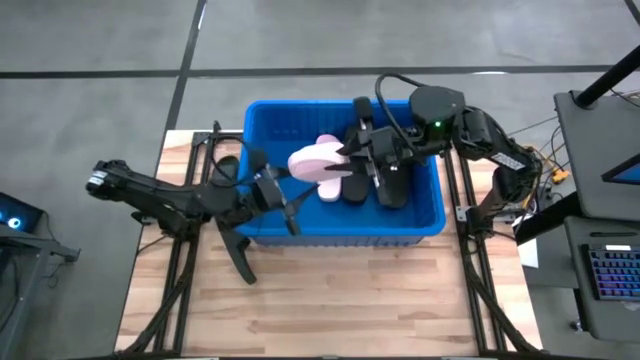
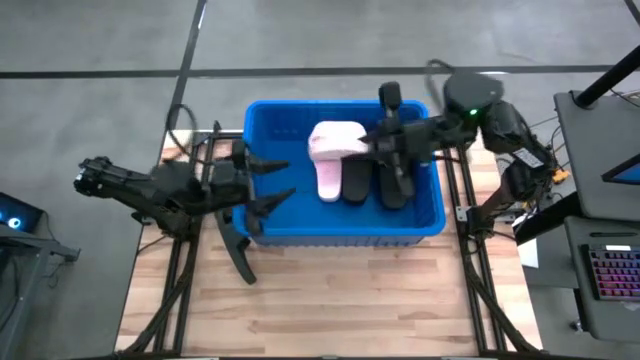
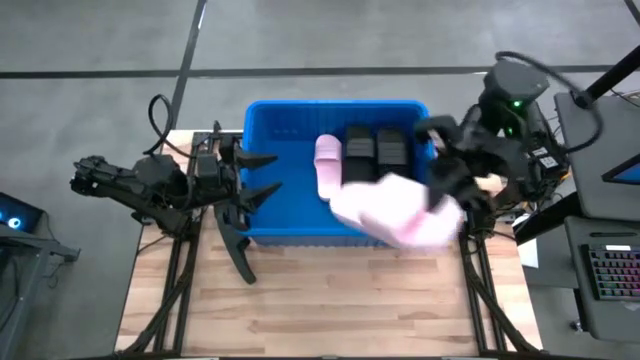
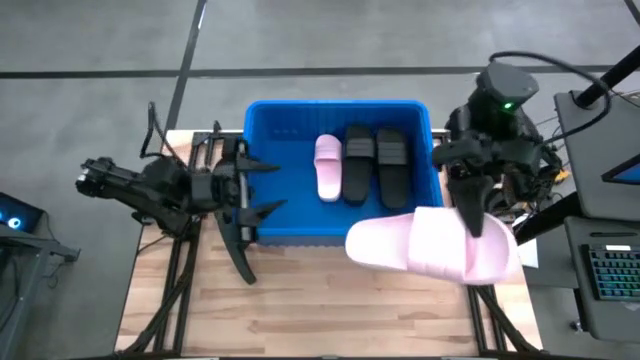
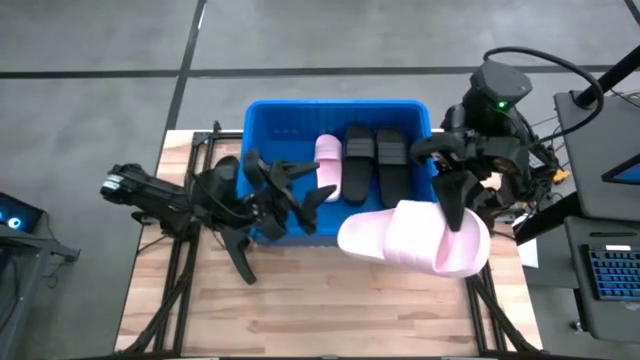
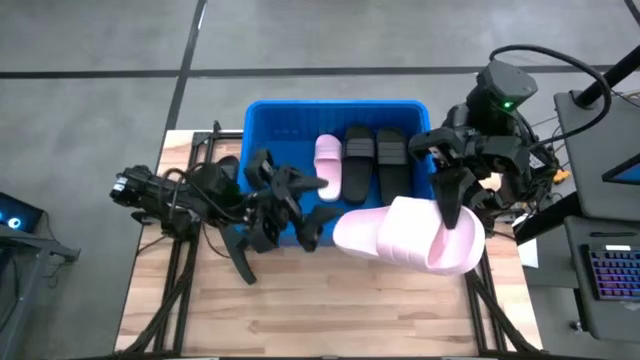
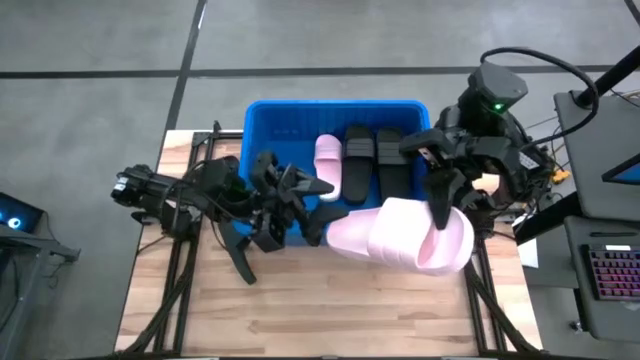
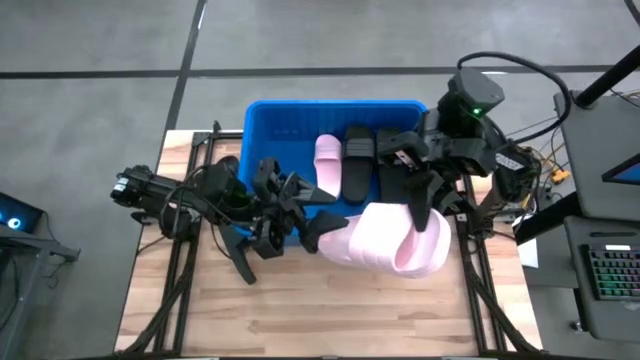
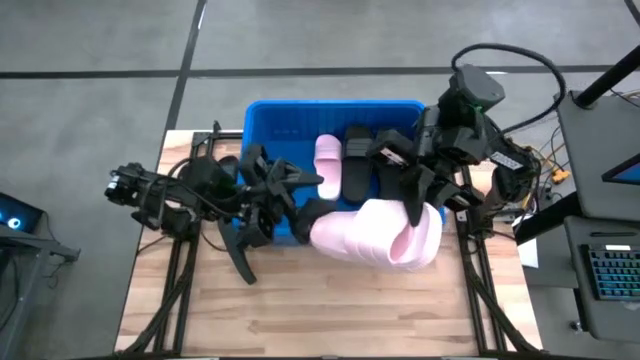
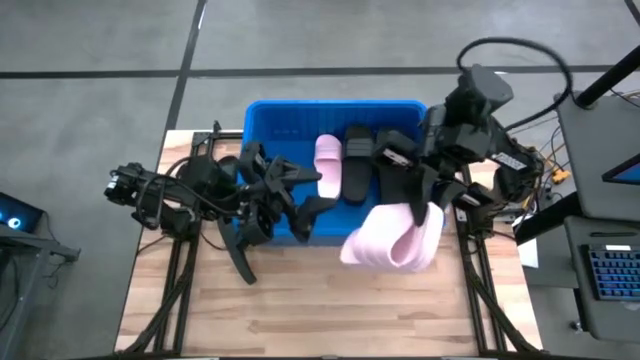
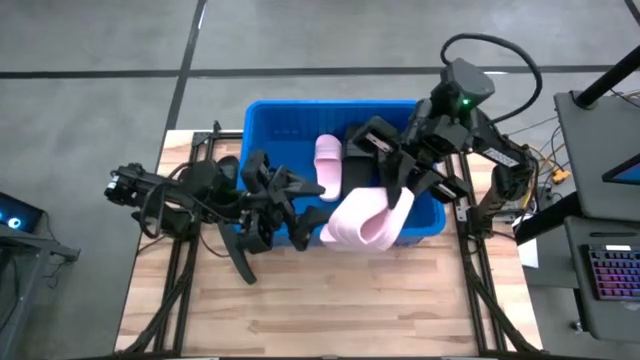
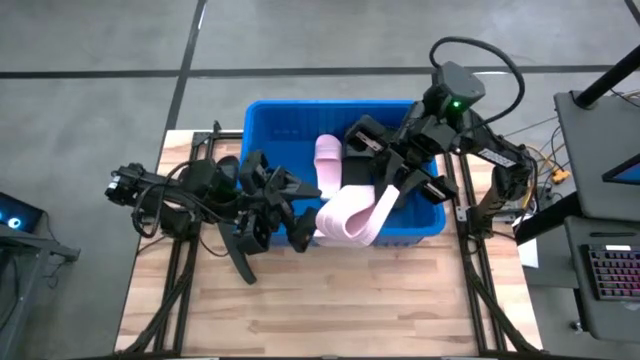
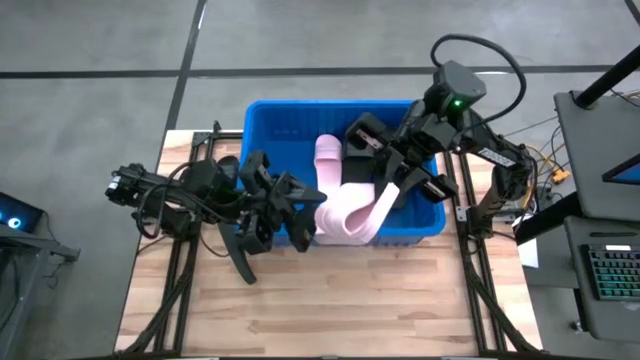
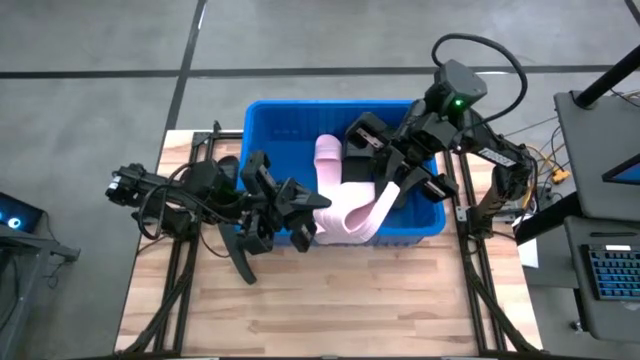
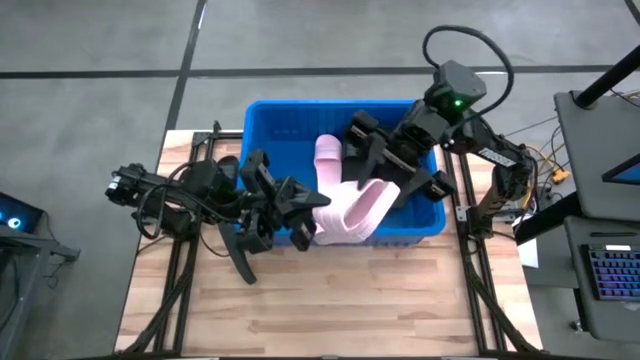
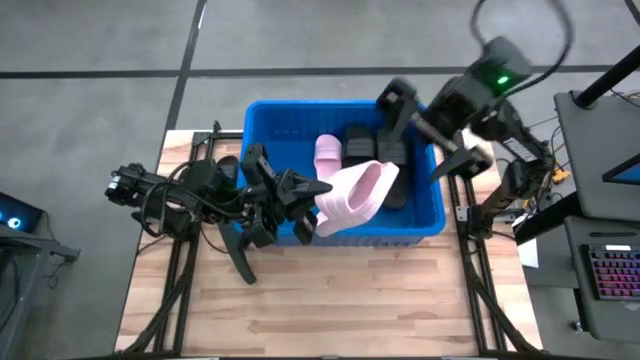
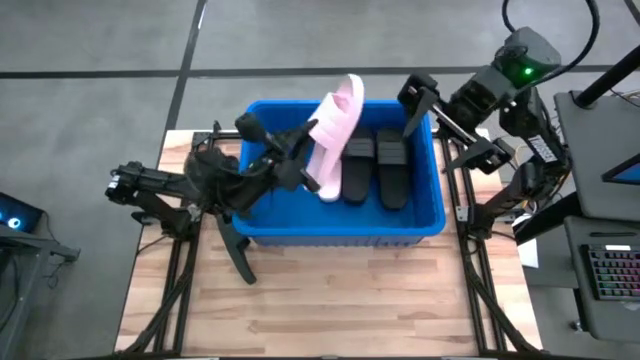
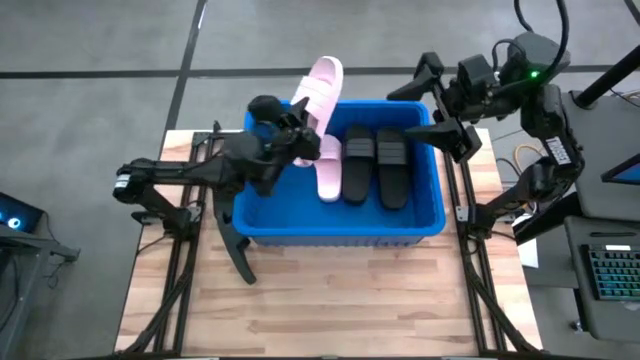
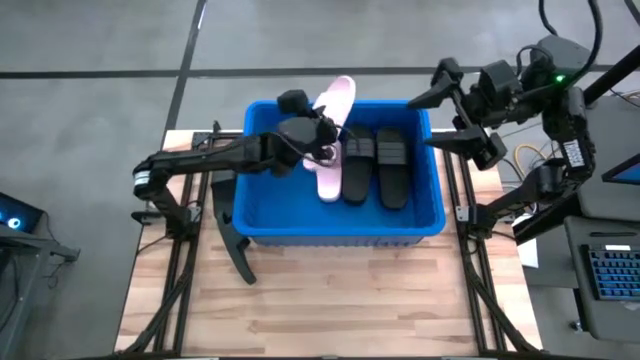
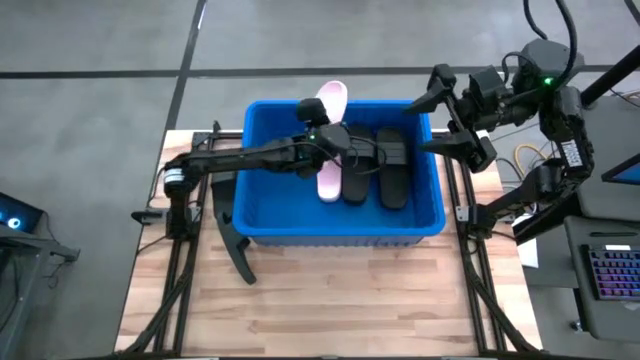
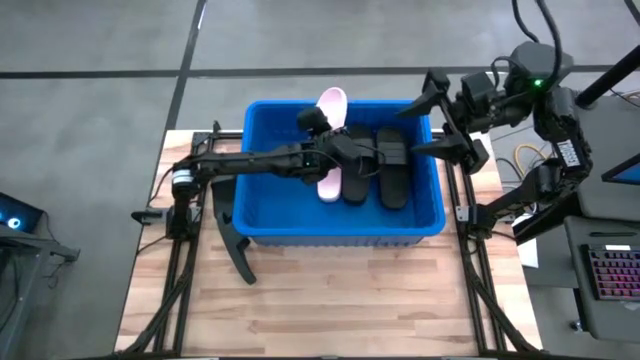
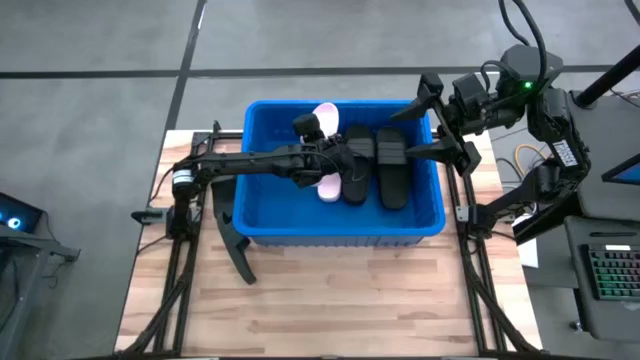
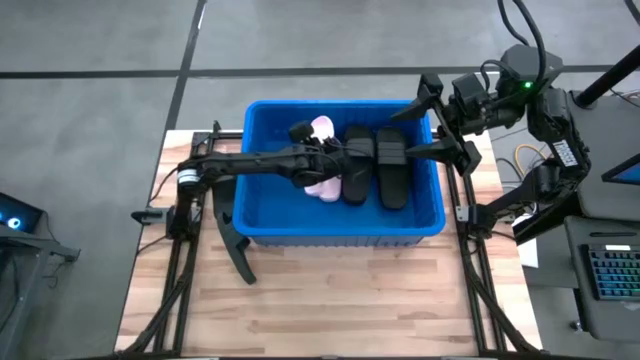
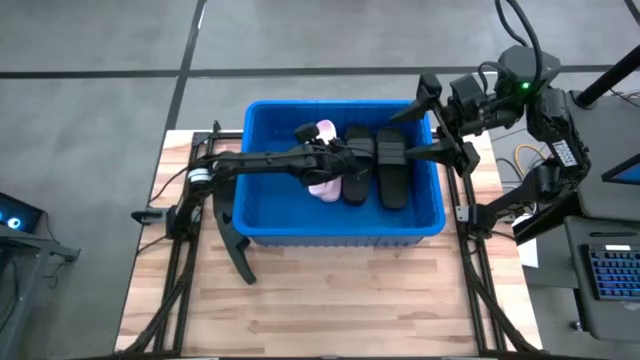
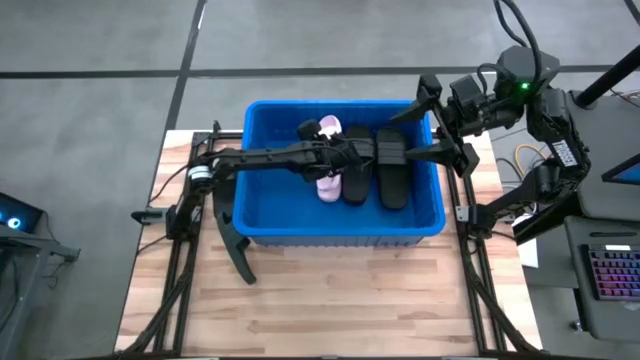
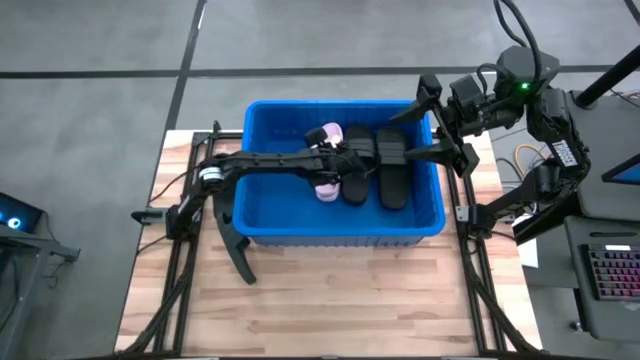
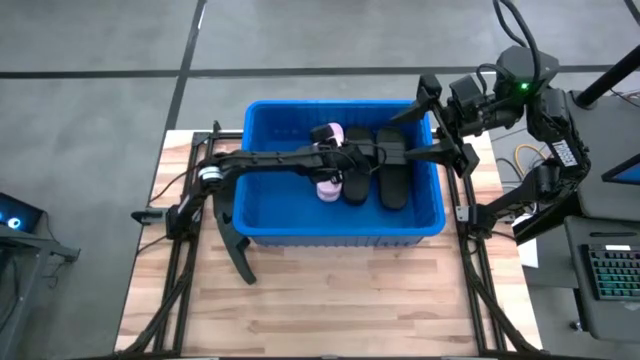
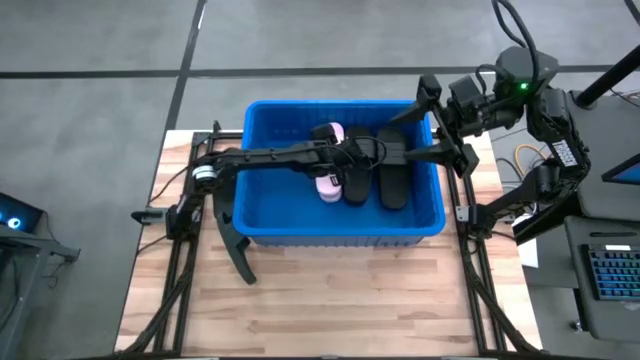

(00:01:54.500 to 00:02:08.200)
Task: Pick and place slides into bin
Put the pink slide into the blue bin

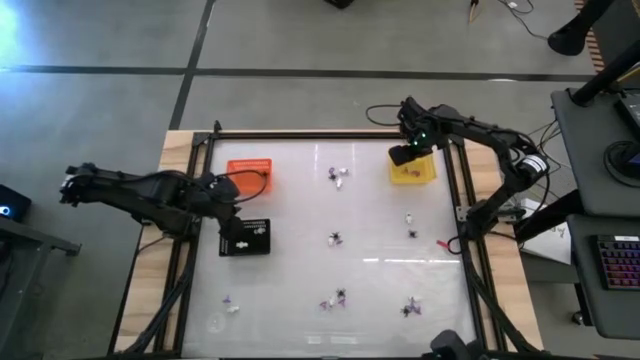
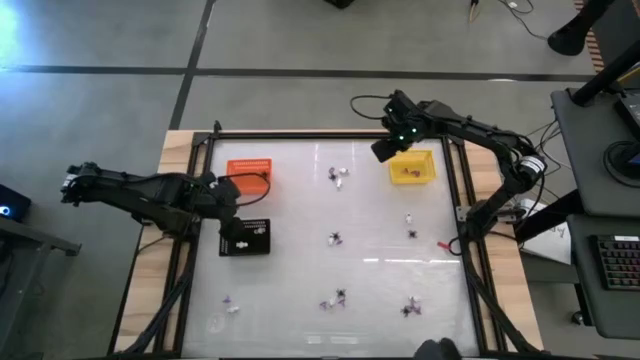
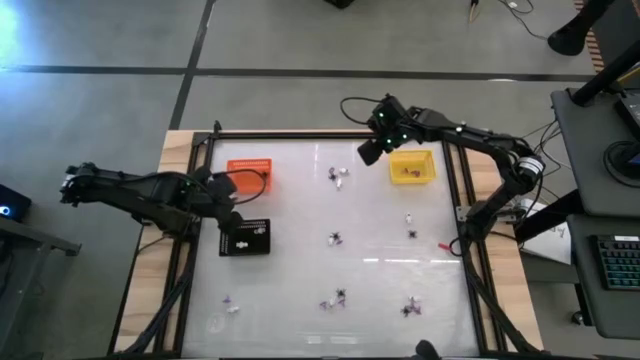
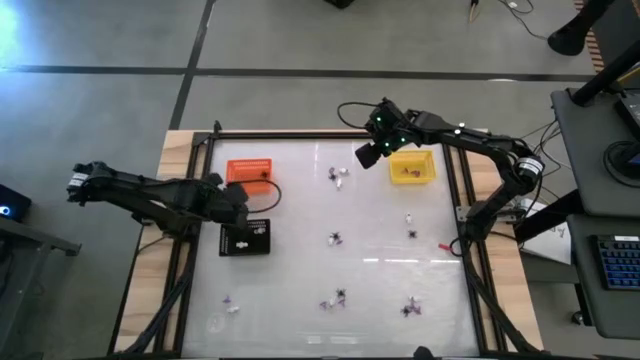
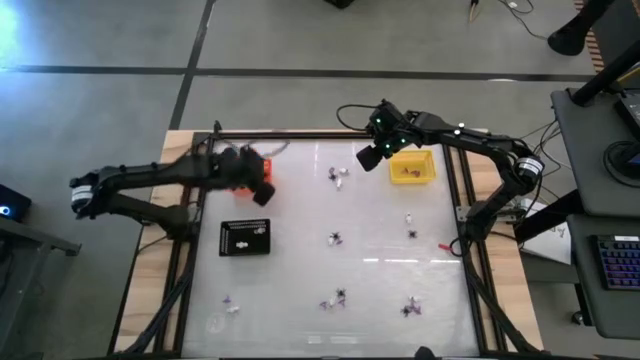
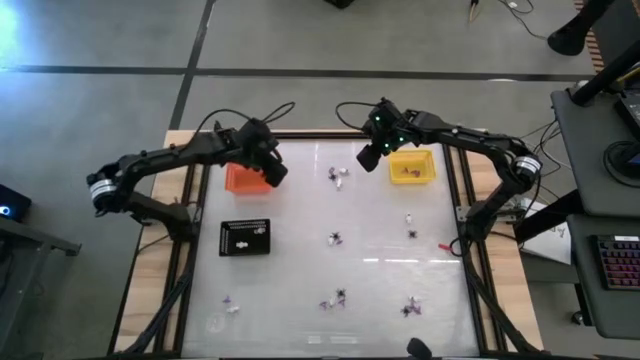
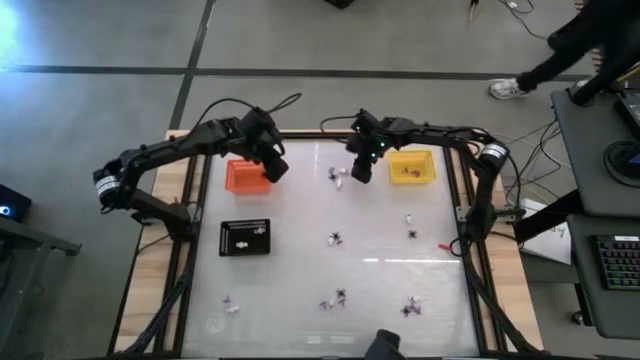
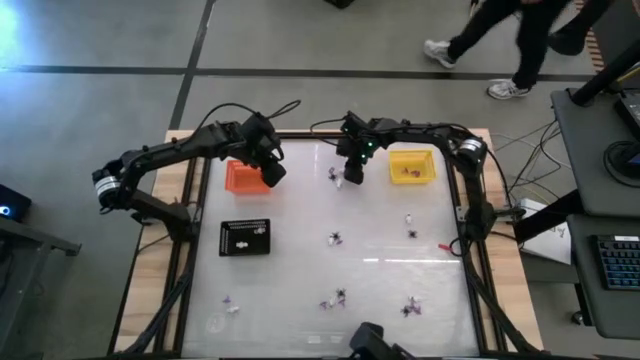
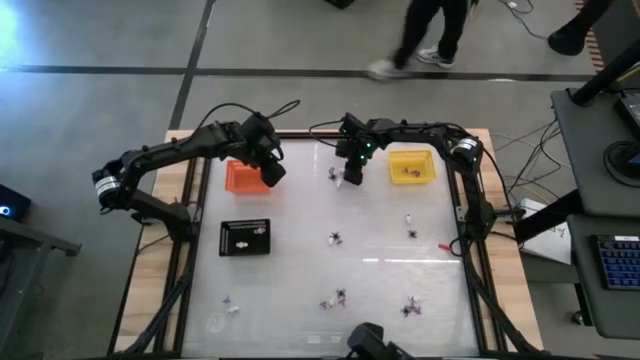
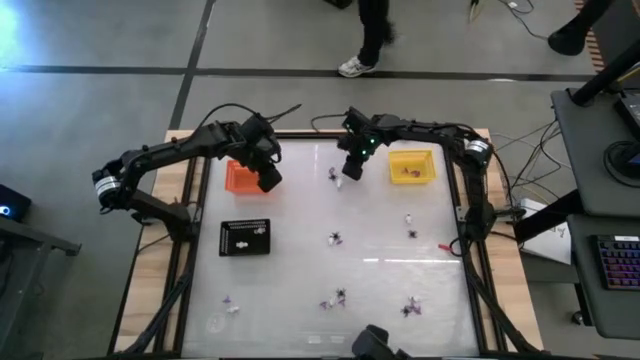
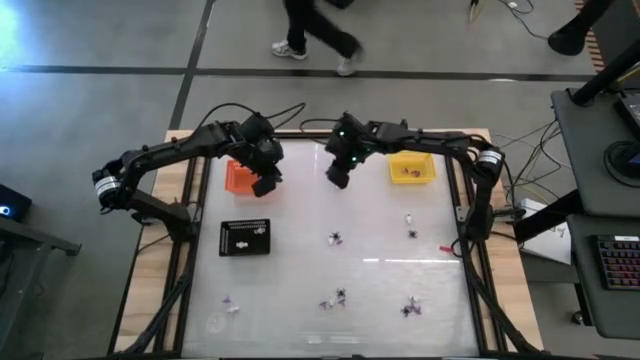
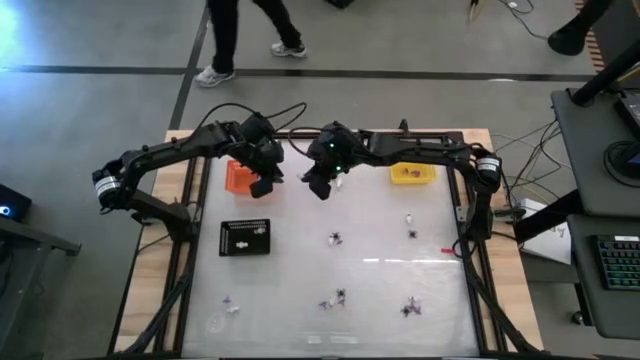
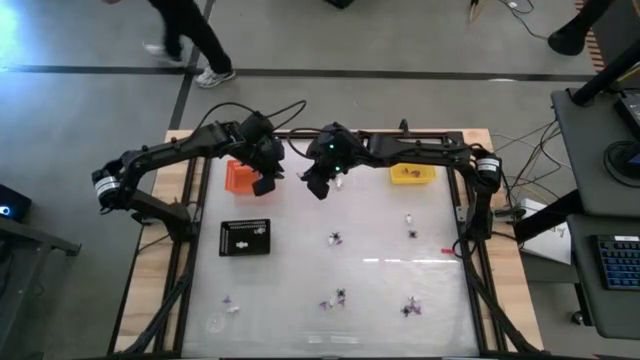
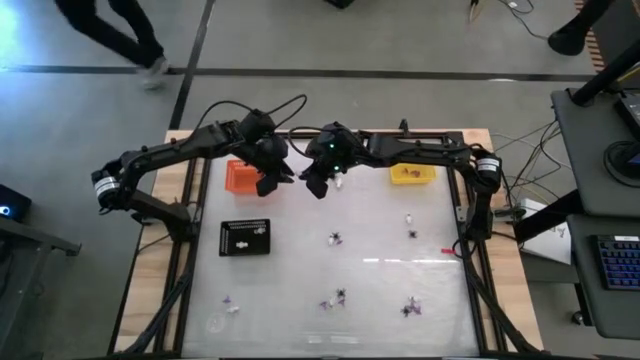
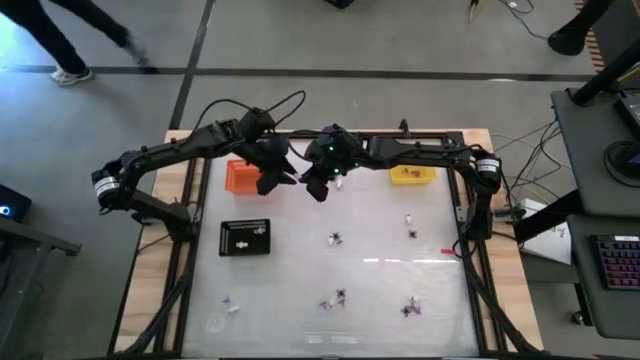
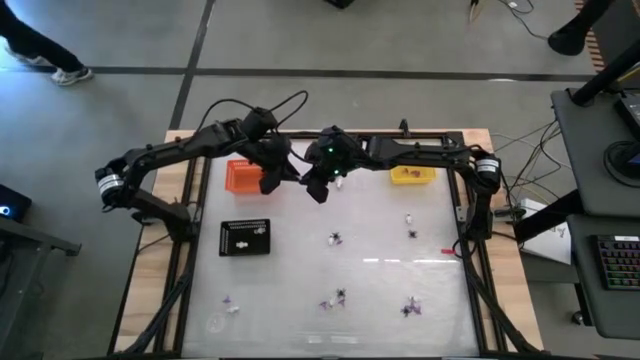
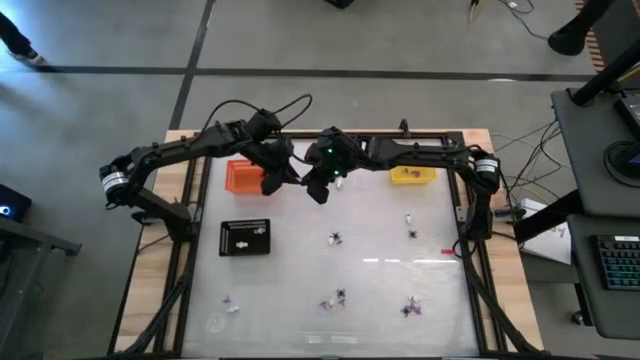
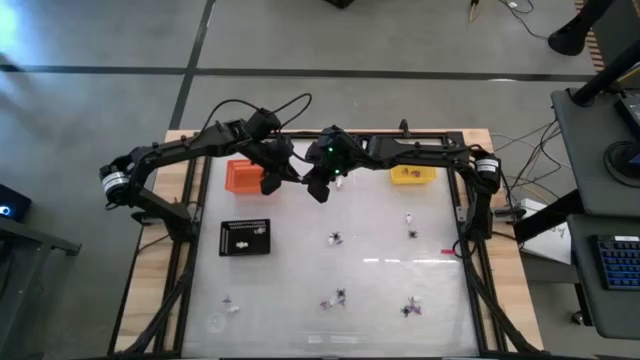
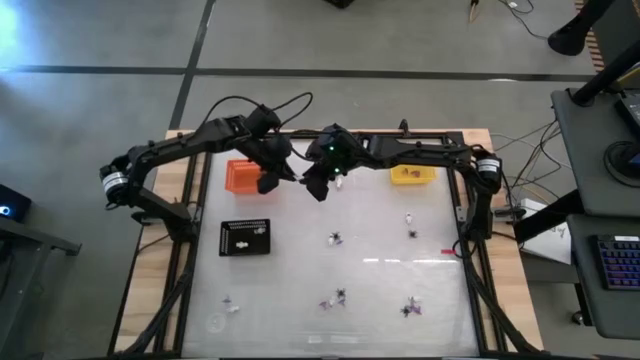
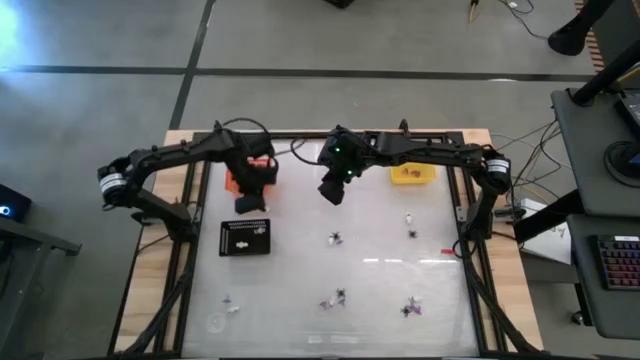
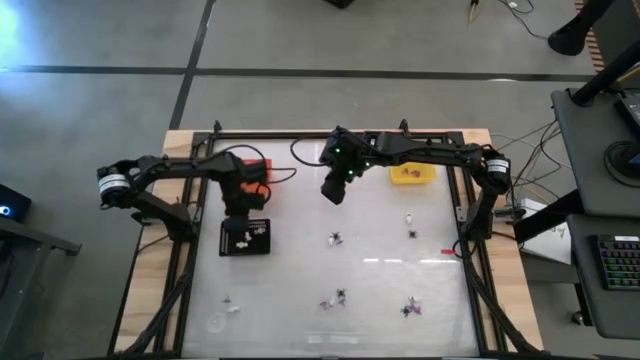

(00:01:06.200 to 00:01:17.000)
Task: Sort Halloween decoration
Put the white skeleton toy into the black bin
